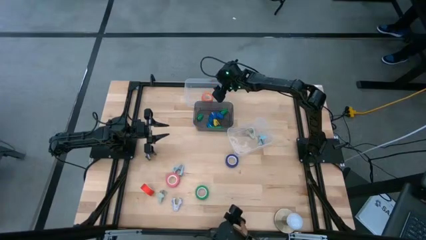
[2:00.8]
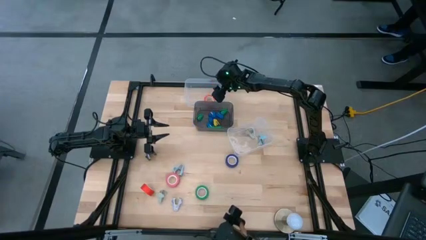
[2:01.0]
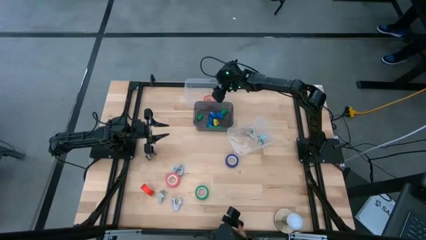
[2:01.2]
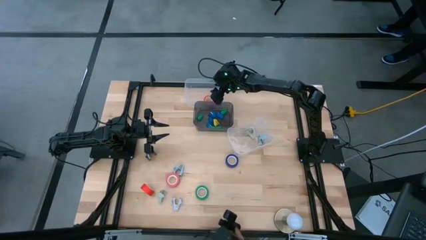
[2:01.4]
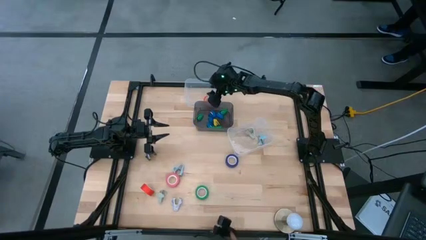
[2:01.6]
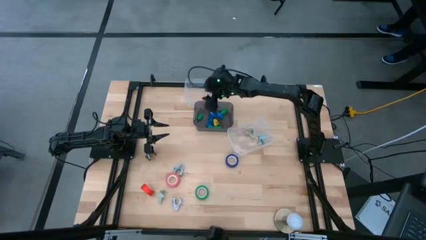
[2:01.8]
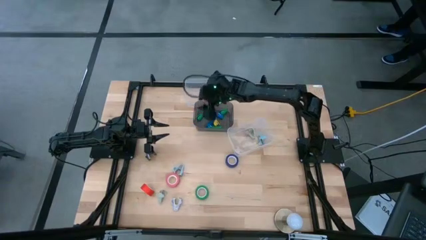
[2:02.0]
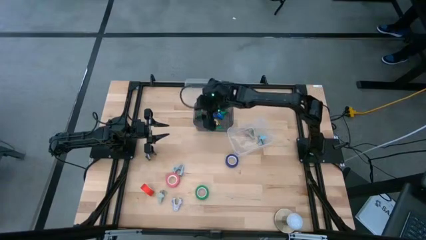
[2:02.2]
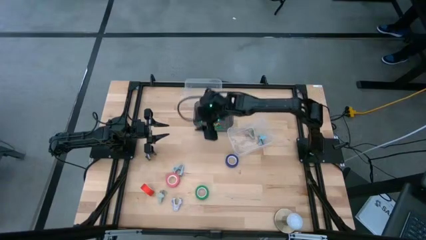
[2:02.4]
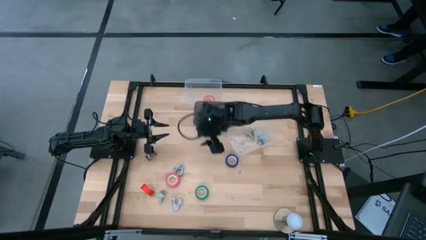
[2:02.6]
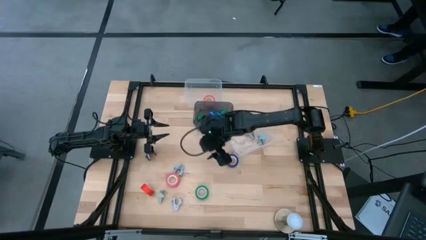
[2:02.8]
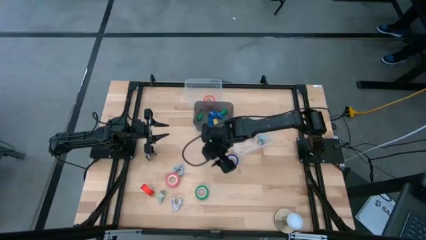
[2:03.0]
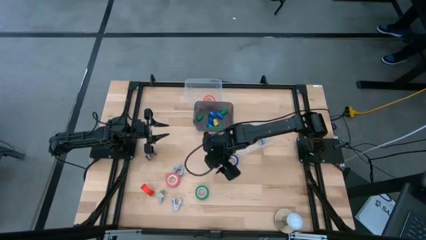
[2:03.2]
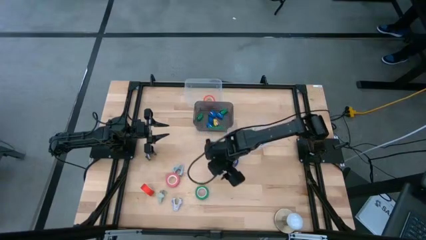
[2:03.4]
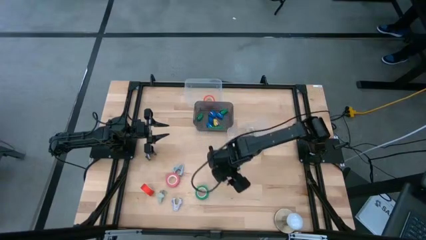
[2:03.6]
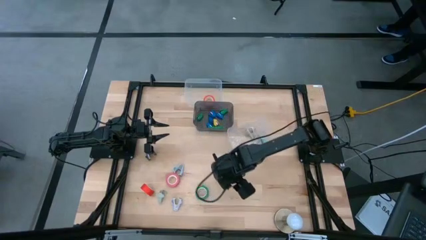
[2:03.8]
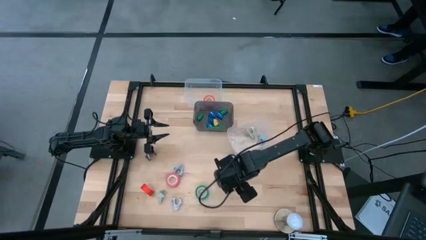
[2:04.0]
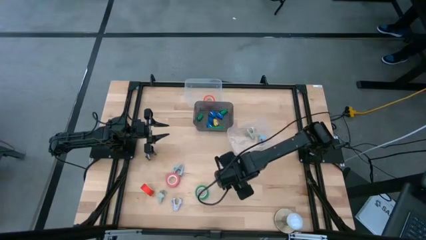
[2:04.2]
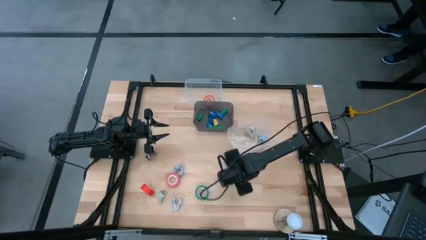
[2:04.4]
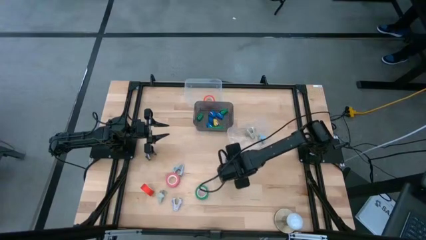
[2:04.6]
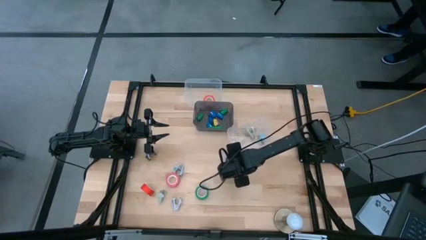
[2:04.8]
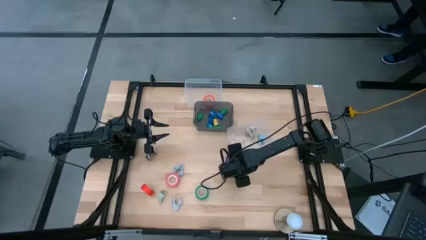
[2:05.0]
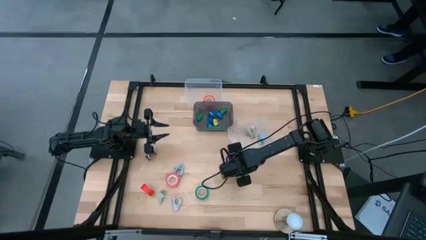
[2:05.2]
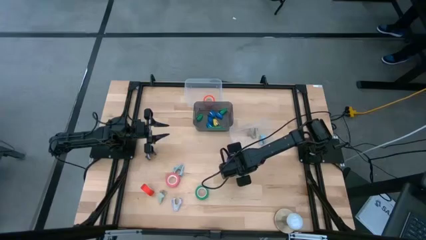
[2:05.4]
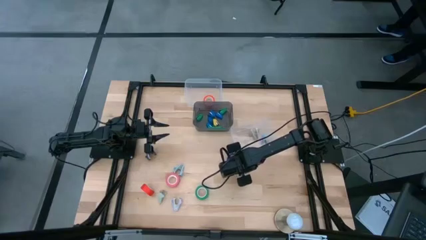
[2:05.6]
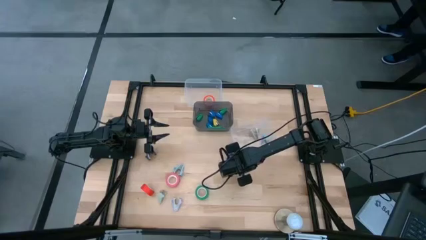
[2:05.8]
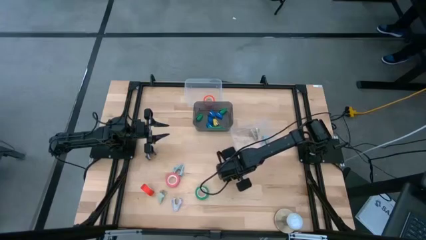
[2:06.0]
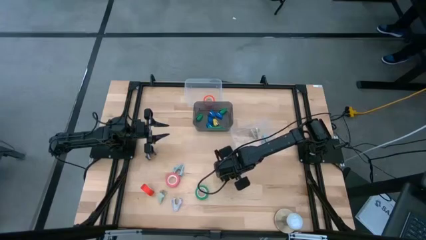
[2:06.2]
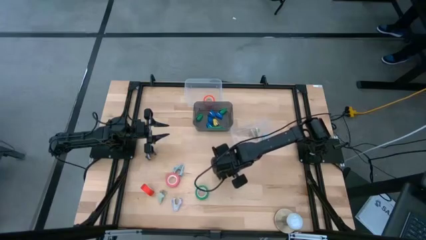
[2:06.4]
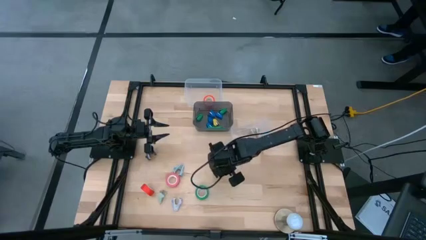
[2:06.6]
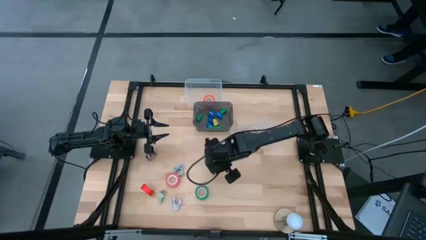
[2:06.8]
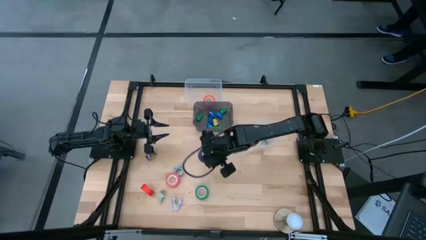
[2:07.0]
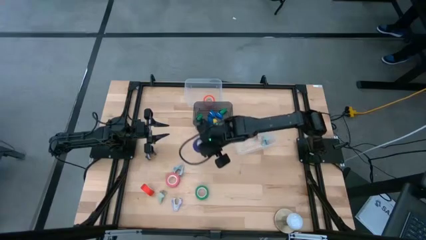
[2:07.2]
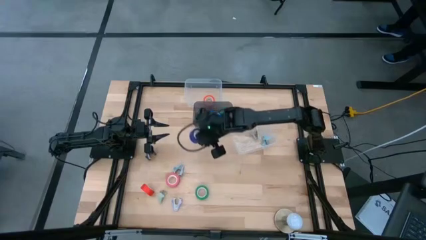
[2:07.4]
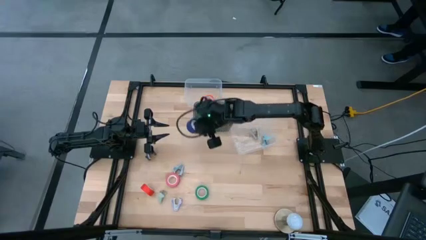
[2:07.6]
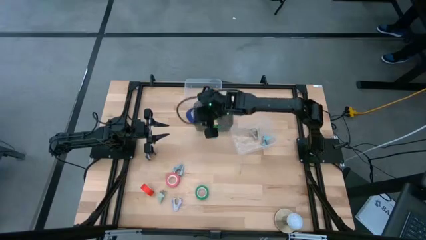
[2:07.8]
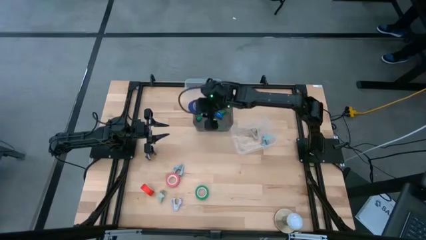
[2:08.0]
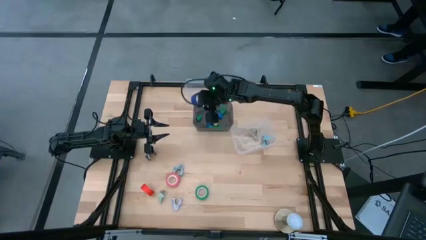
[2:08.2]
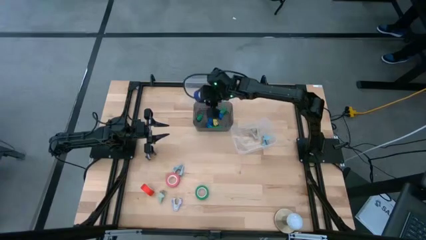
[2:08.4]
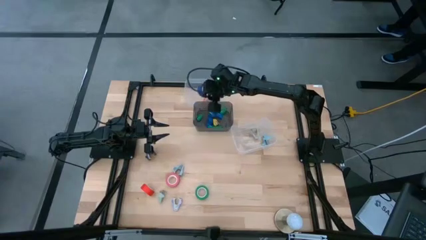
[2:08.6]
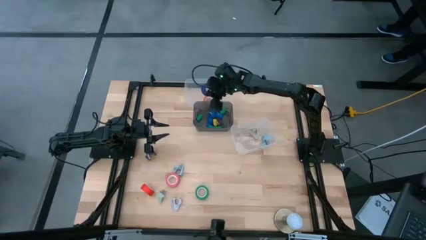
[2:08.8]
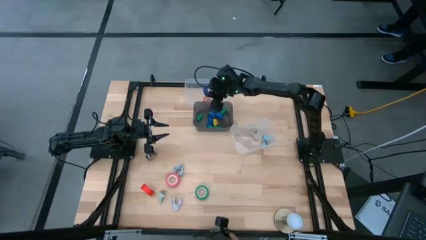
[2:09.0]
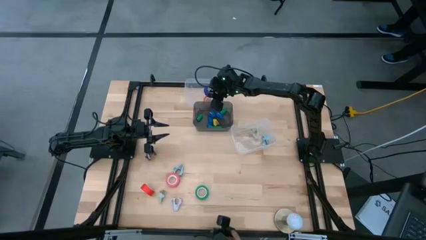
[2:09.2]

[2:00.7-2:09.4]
Task: Pick and place Stapler, Stapler remover, tape
Put the blue tape into the top transparent bin

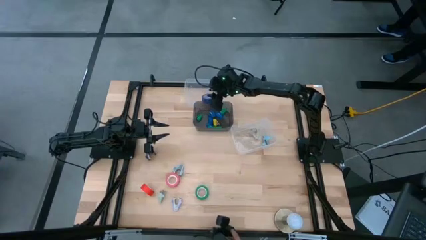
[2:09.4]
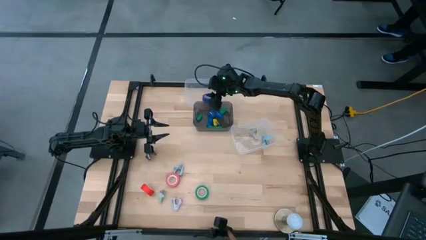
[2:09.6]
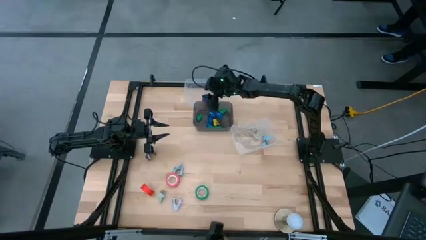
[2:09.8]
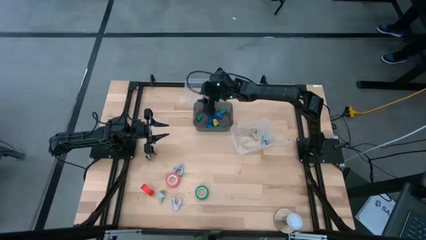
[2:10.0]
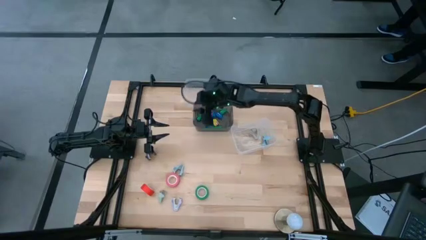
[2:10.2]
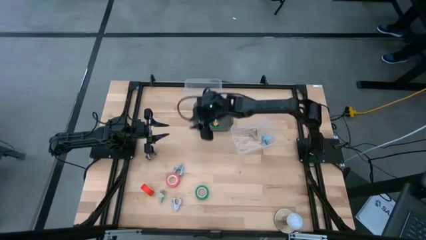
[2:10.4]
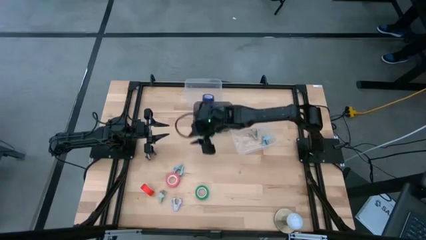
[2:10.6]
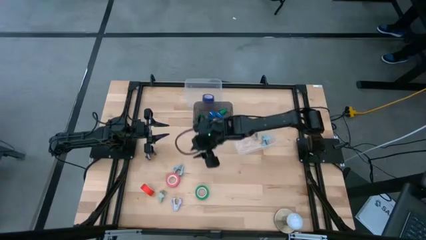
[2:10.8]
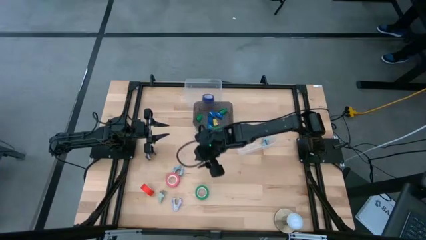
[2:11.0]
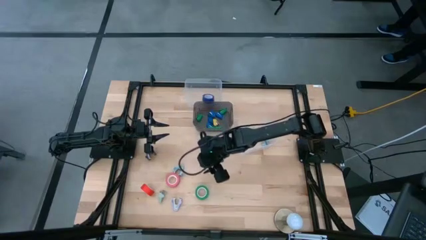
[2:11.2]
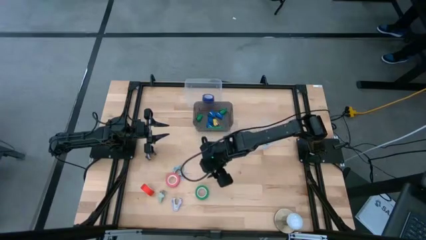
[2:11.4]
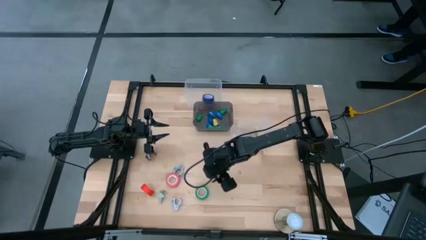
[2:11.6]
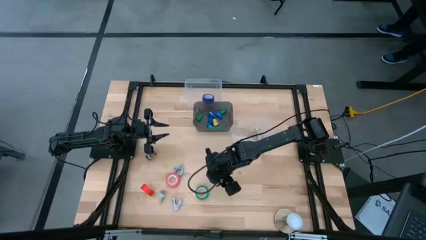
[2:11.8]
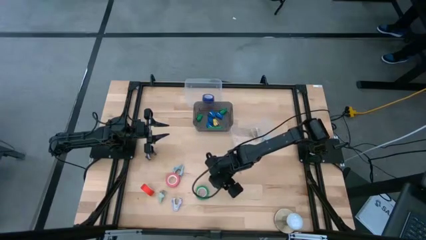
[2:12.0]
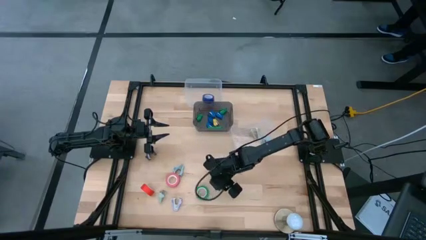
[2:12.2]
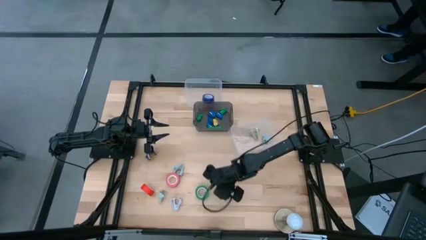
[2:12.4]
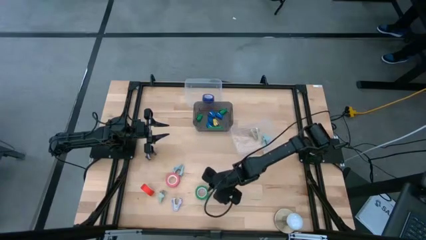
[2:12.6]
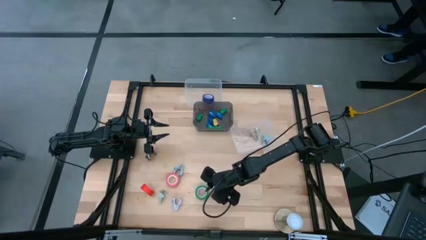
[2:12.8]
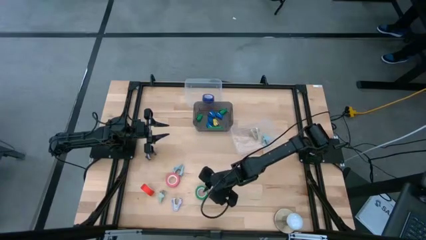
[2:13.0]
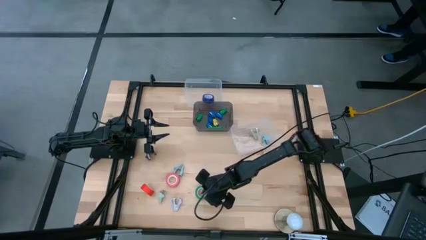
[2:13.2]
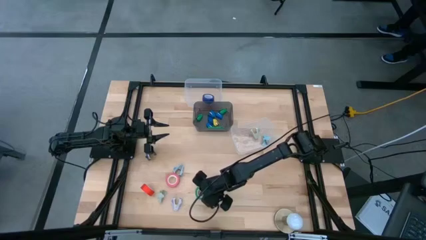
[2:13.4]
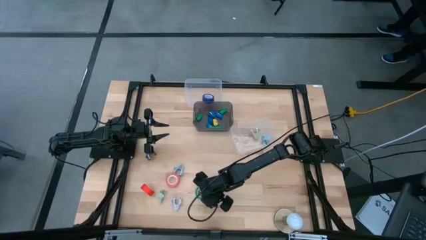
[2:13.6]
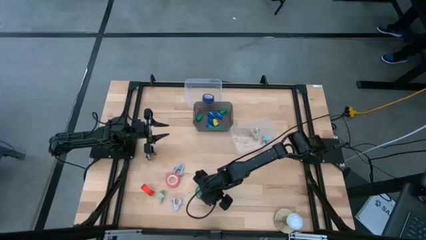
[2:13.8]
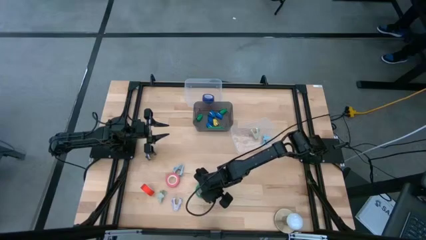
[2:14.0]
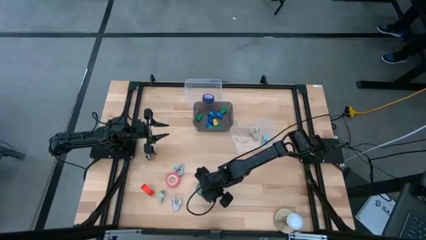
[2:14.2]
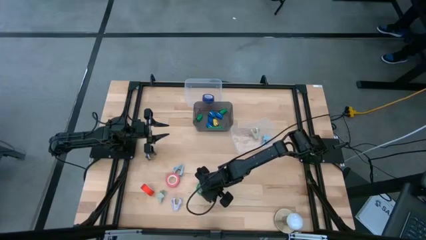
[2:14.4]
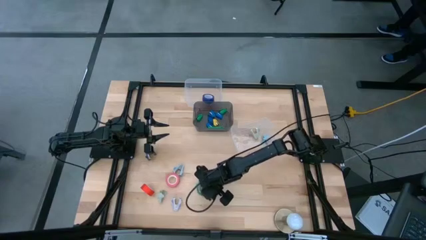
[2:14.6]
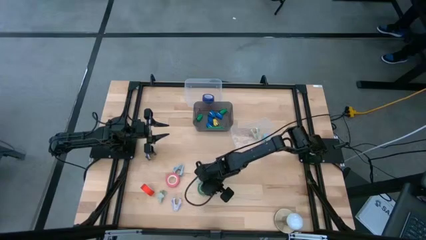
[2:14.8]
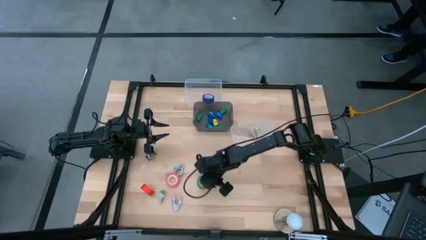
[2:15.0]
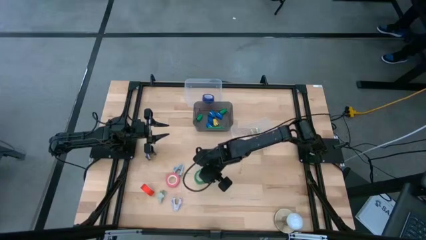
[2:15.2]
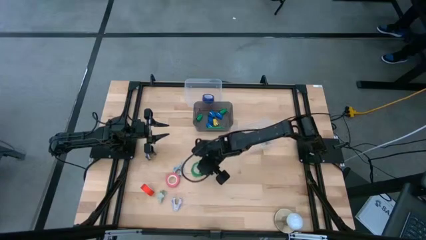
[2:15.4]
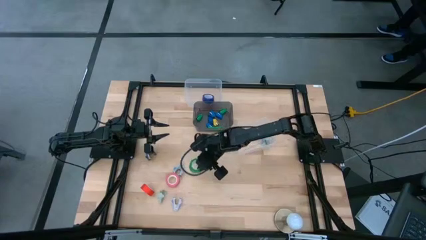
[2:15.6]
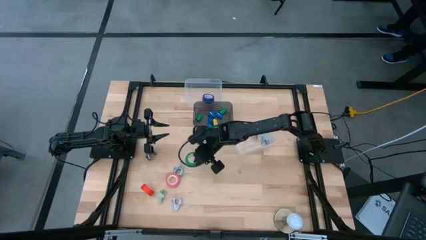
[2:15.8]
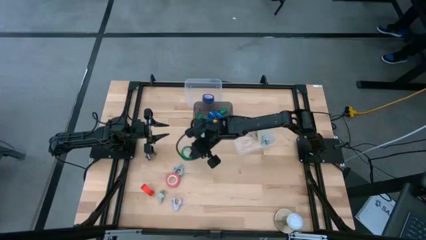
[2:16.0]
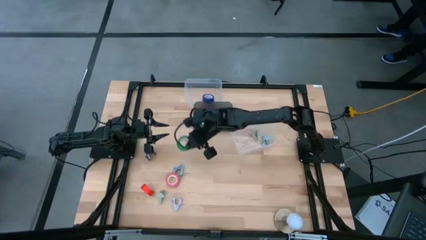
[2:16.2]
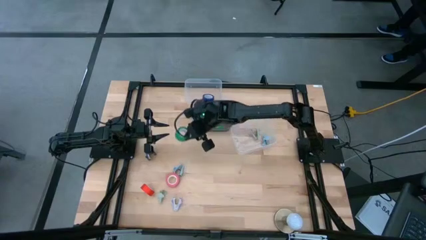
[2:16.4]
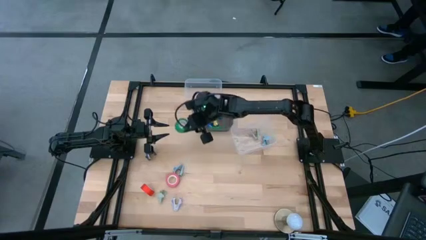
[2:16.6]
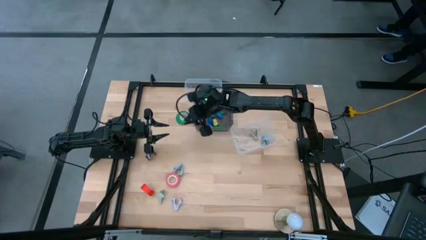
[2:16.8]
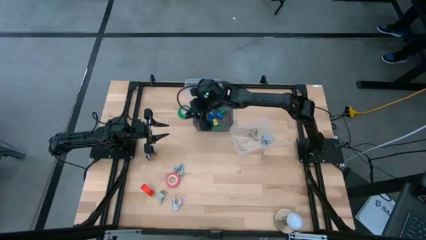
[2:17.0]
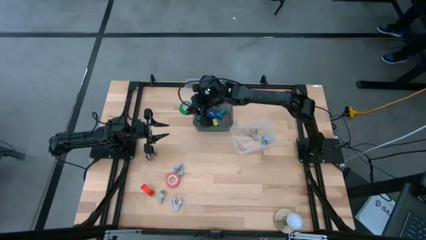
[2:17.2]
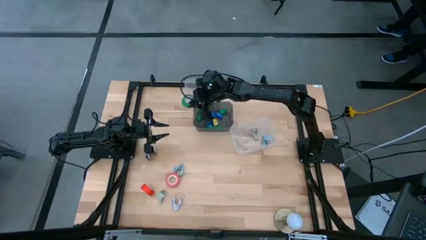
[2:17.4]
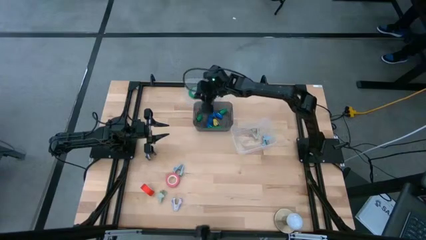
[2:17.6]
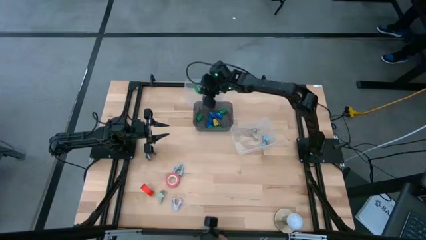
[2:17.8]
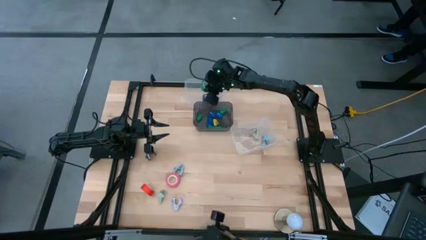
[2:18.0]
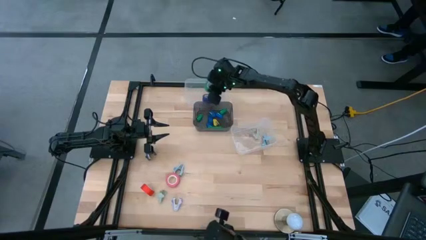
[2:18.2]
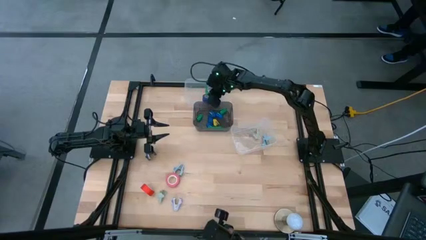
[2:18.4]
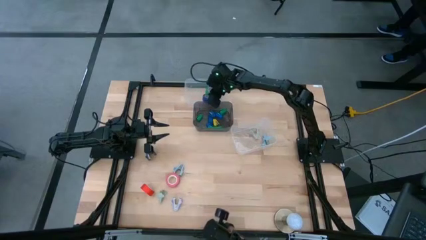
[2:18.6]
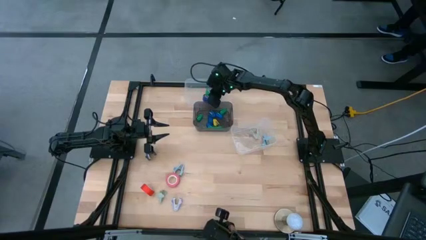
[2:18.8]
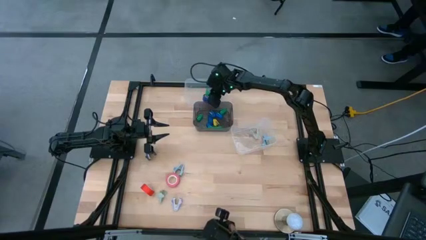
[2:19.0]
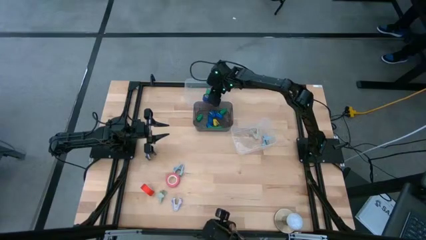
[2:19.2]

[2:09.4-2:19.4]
Put the green tape into the top transparent bin
